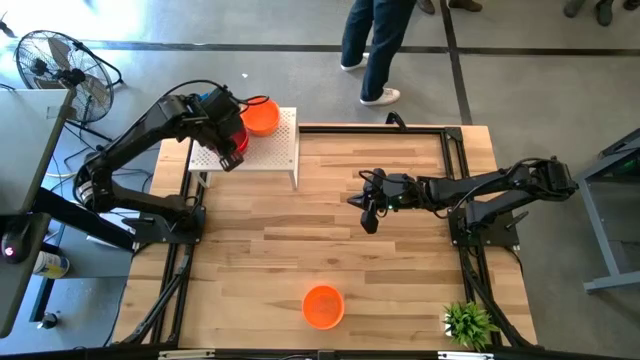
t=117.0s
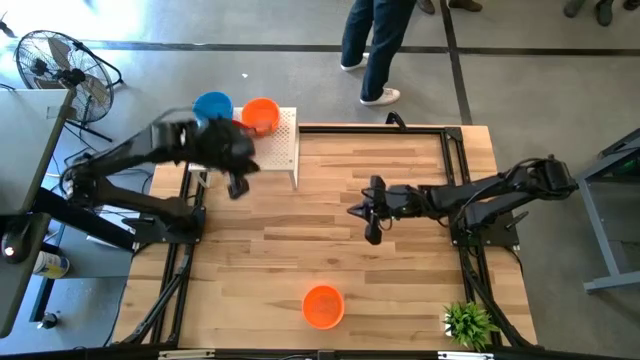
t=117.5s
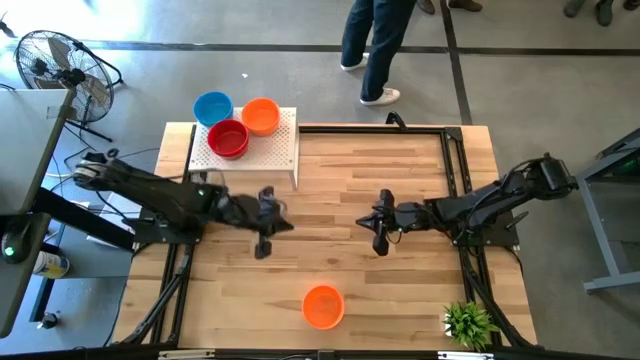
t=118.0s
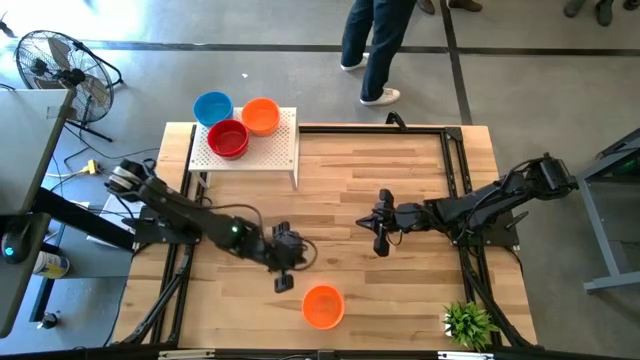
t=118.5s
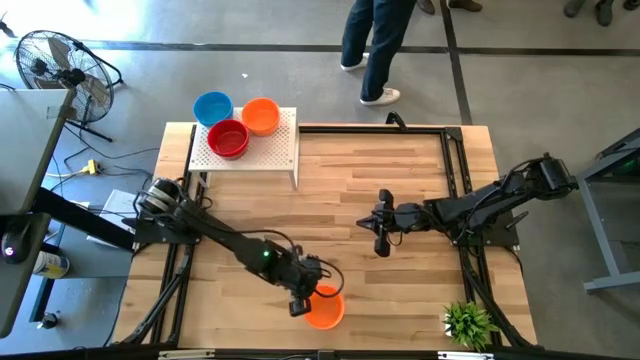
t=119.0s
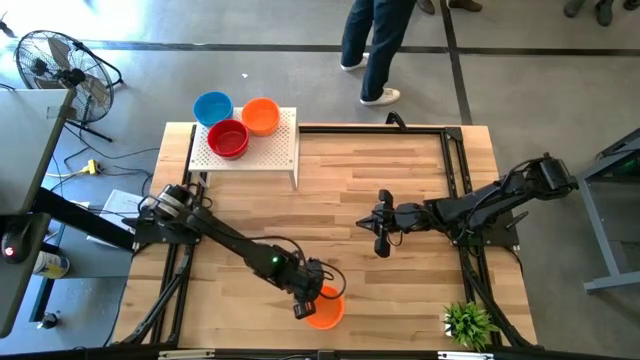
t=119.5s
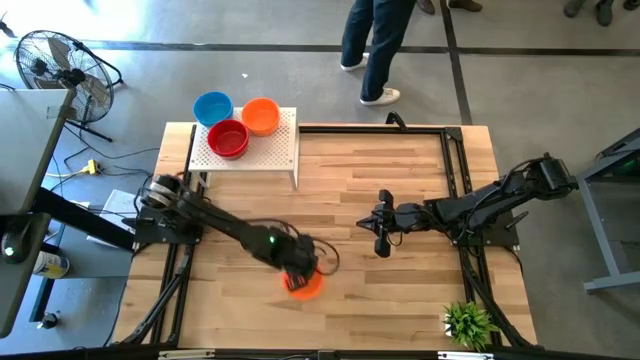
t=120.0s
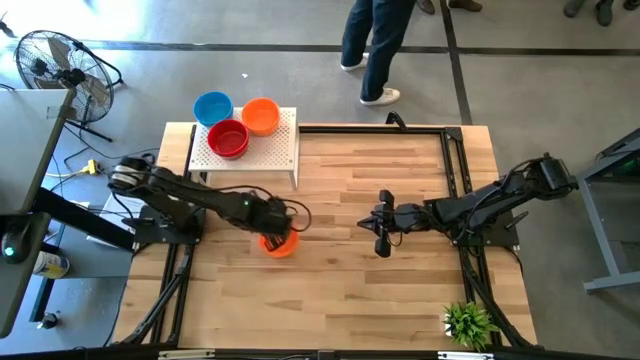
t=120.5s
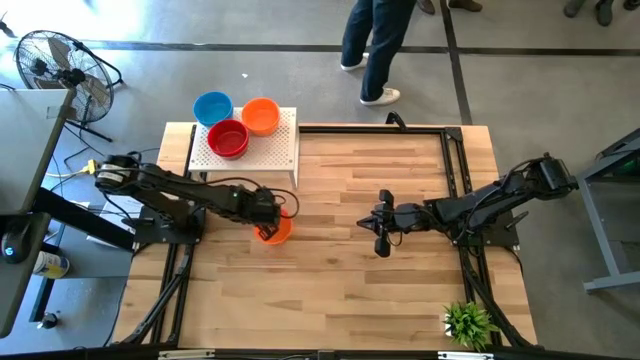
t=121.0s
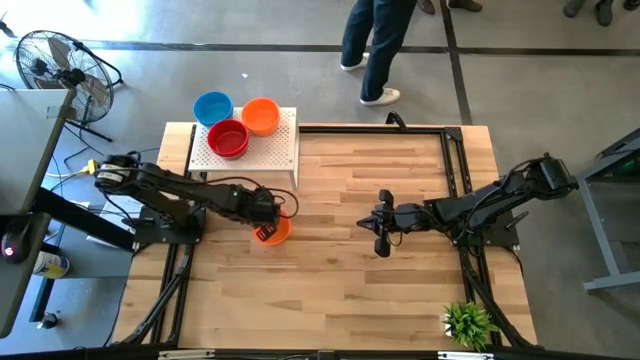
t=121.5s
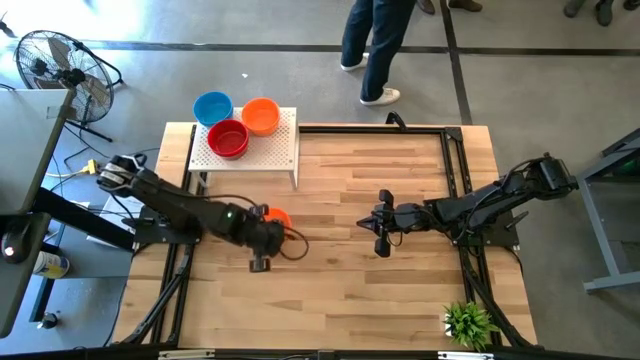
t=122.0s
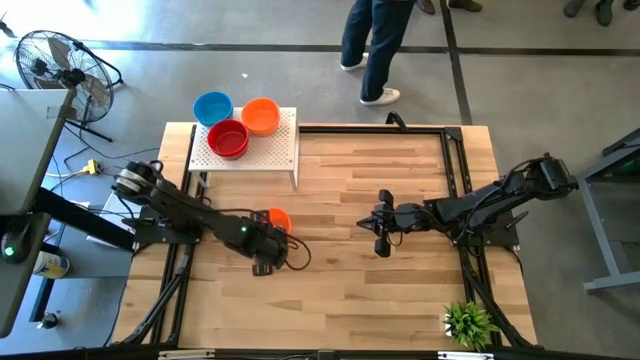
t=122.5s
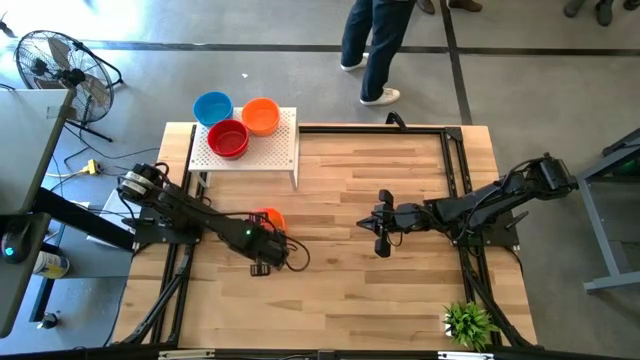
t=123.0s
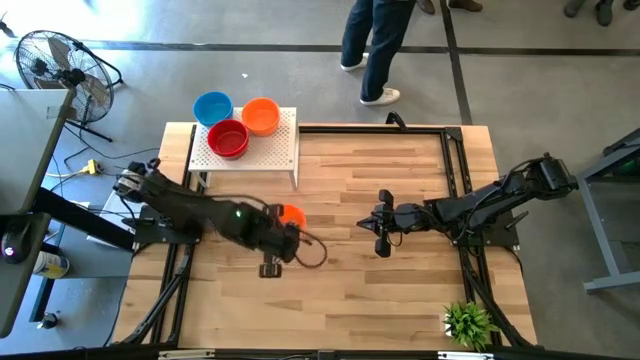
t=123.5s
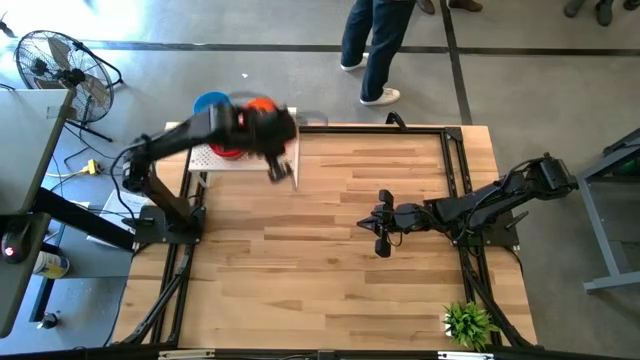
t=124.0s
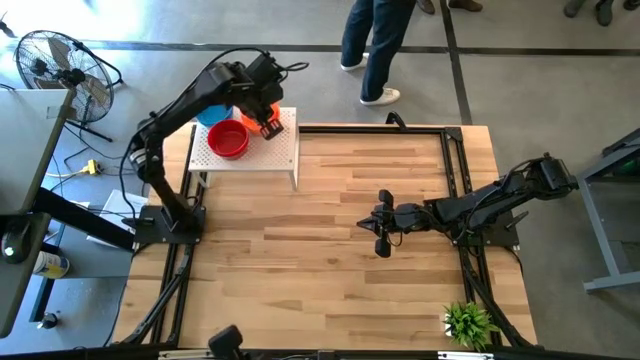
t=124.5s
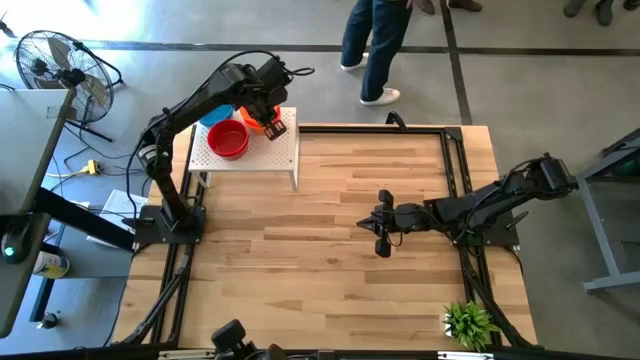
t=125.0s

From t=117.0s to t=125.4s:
Task: Pick & Place Mini bowls
Stack the orange bowl on top of the orange bowl on the shelf

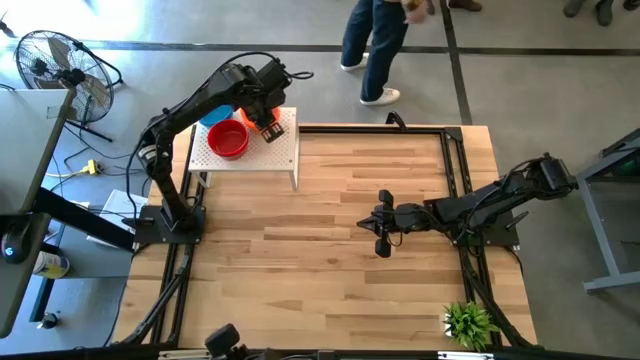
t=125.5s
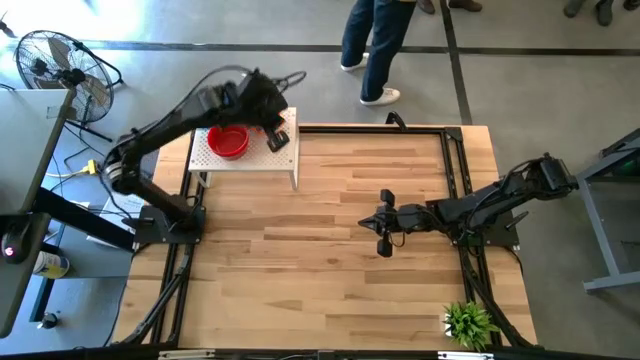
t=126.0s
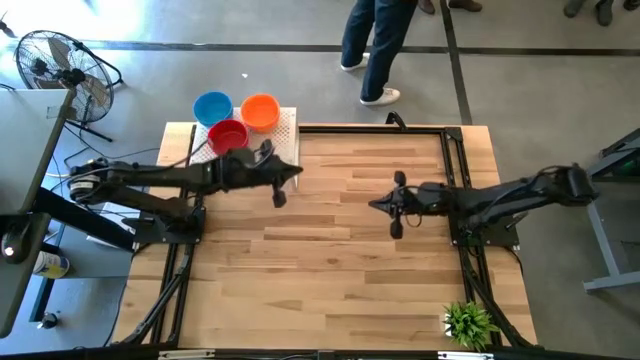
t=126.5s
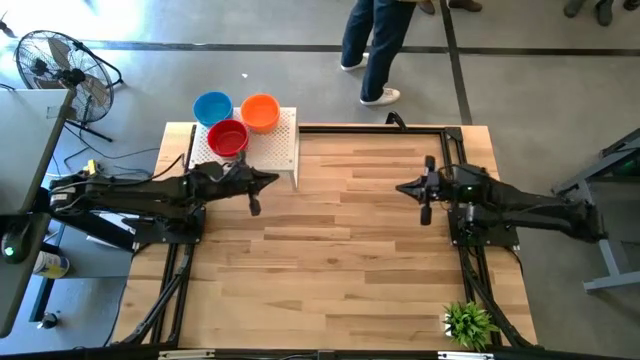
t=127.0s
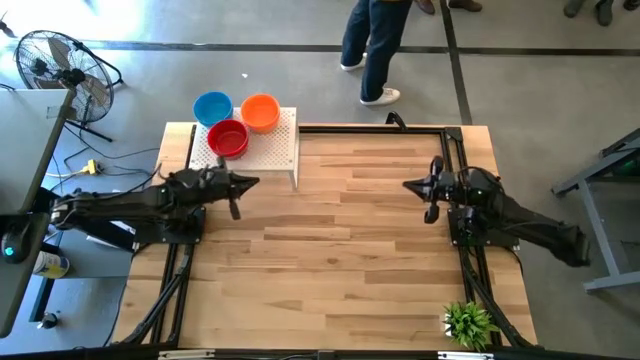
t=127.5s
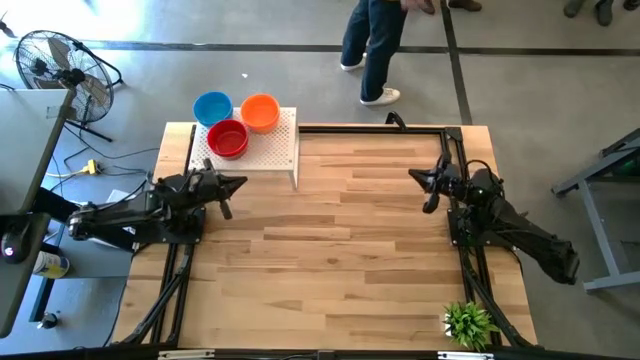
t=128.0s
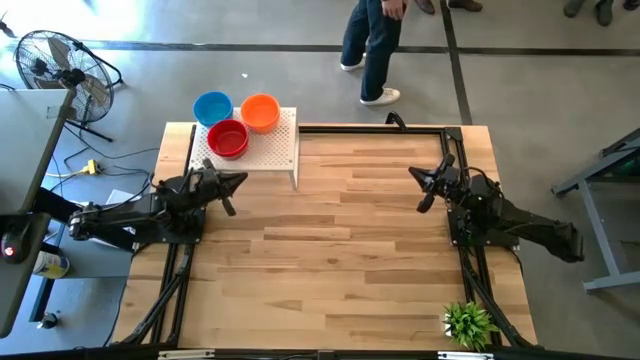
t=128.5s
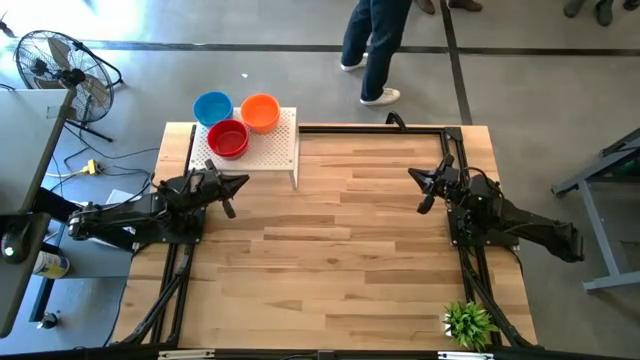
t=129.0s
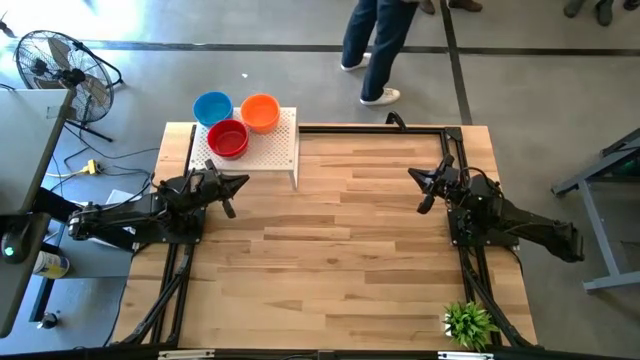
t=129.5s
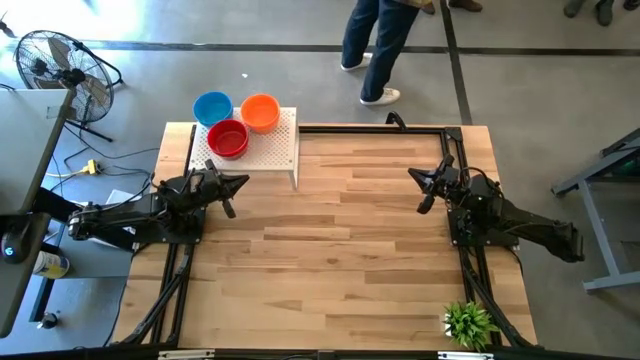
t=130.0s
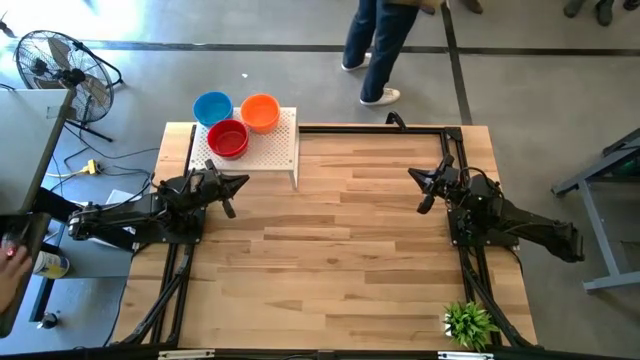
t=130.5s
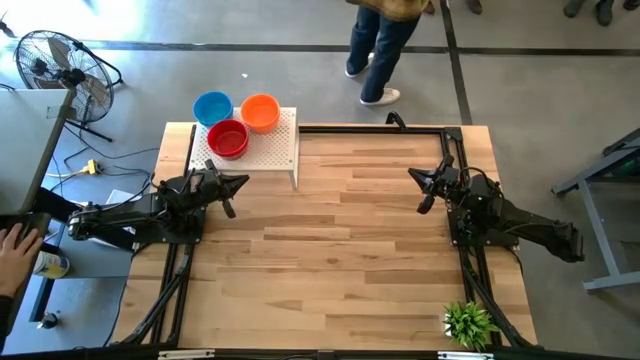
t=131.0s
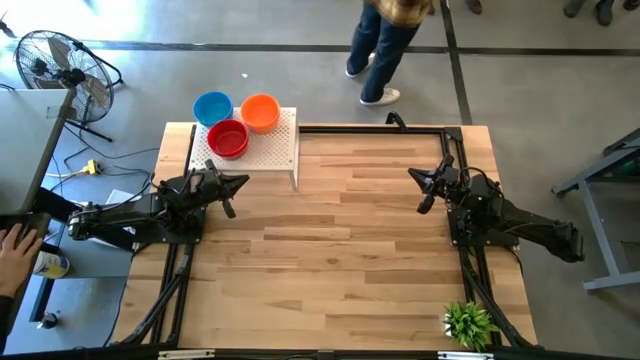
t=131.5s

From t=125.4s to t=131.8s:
Return to Home Position

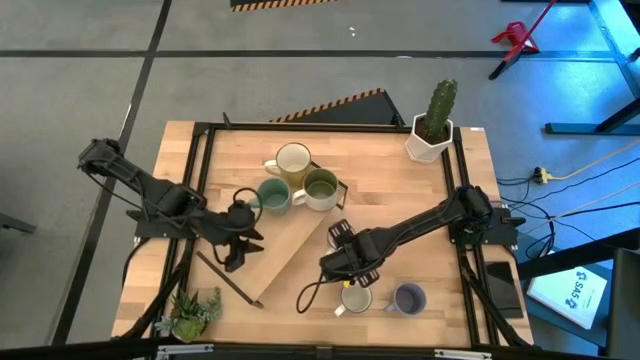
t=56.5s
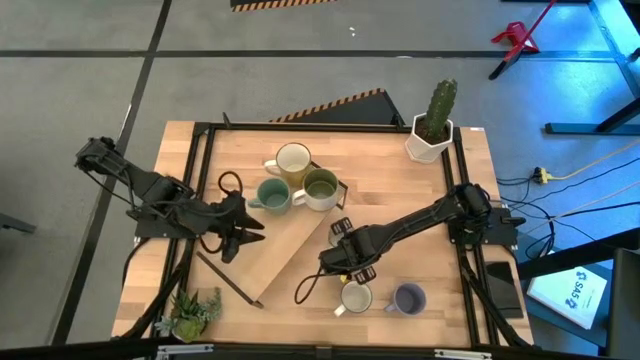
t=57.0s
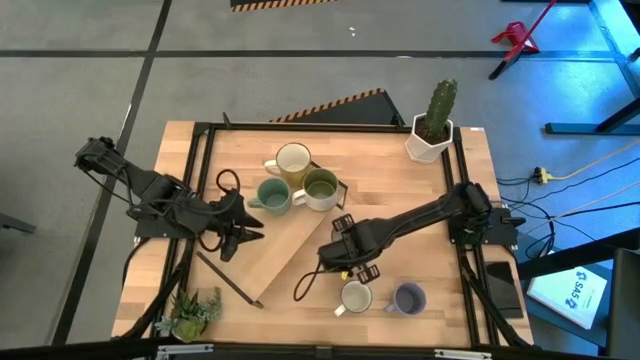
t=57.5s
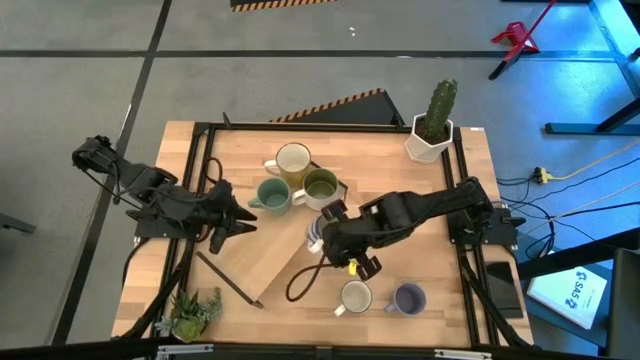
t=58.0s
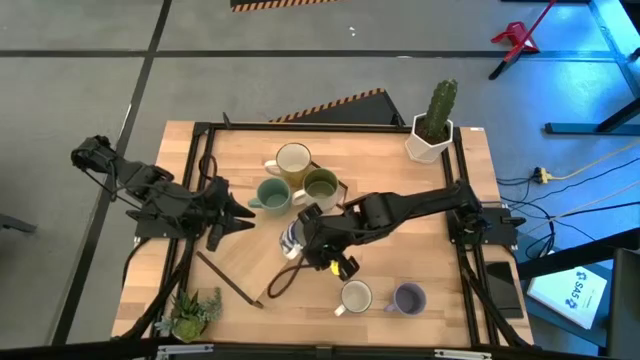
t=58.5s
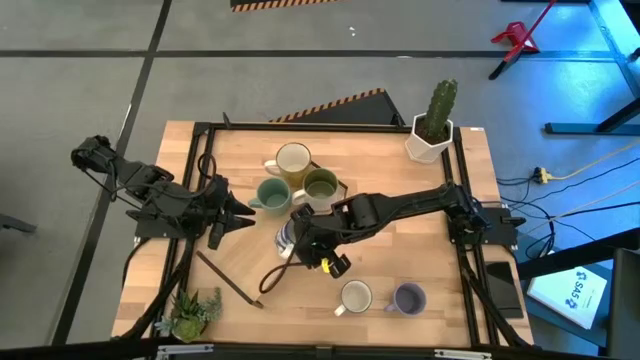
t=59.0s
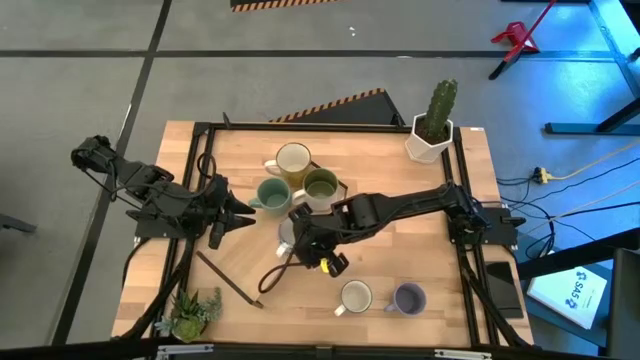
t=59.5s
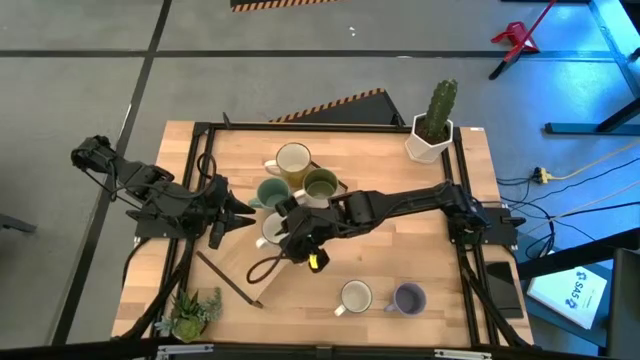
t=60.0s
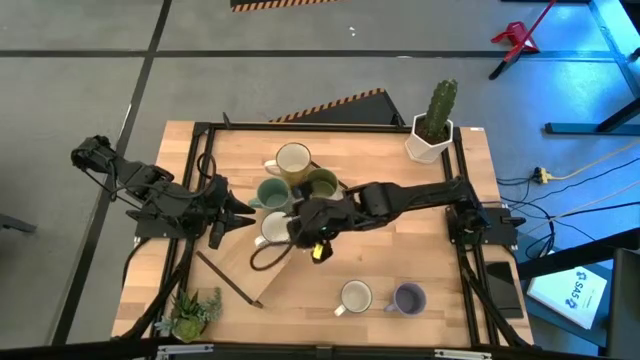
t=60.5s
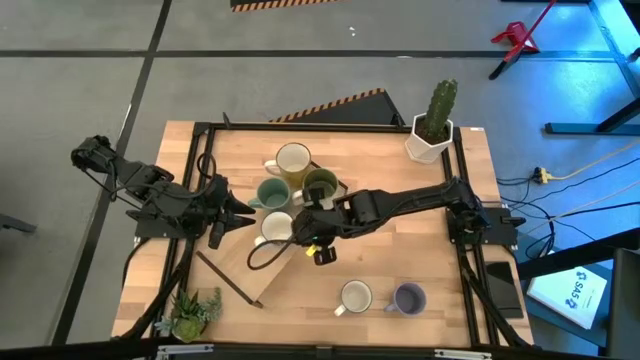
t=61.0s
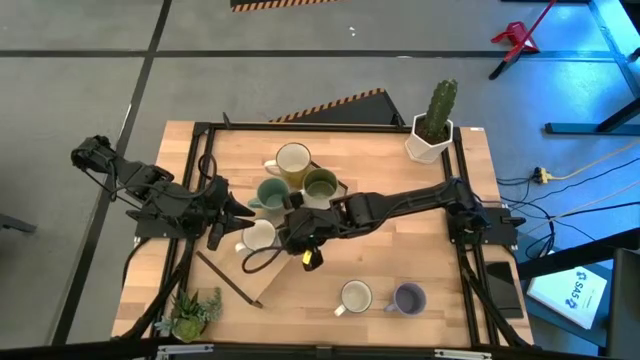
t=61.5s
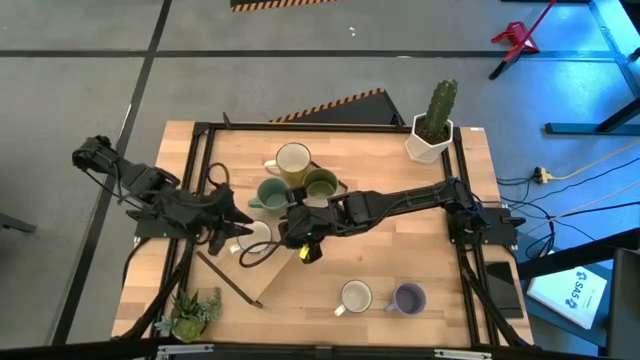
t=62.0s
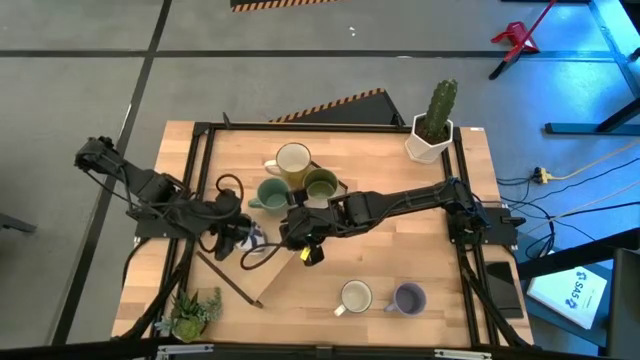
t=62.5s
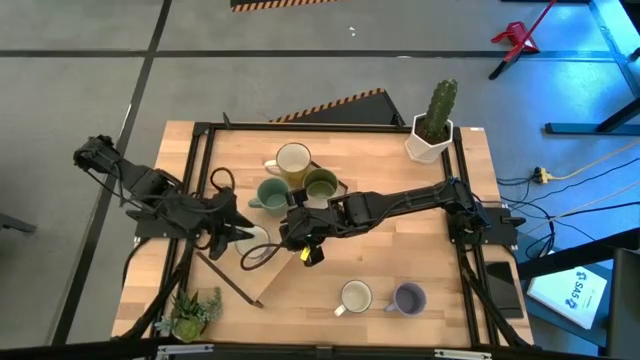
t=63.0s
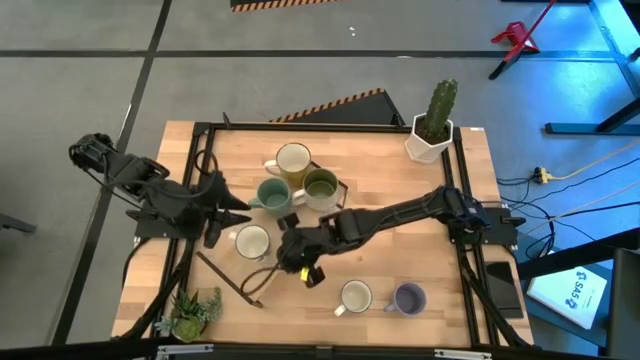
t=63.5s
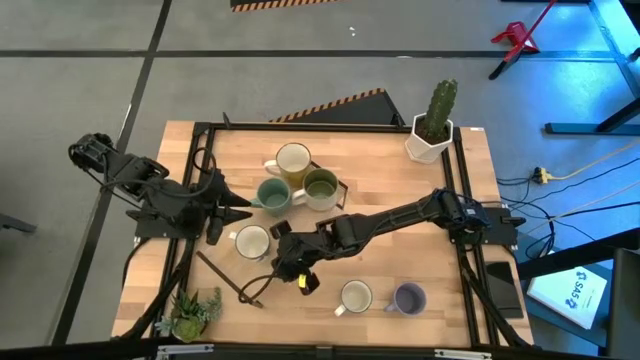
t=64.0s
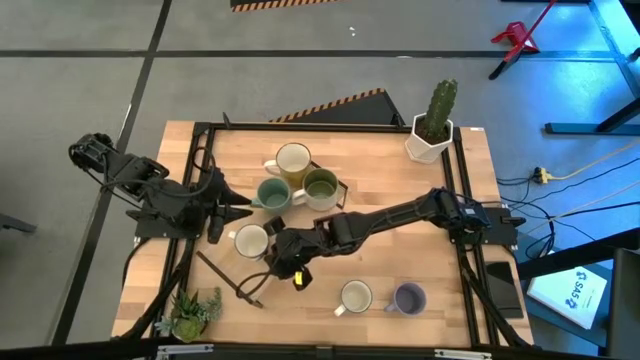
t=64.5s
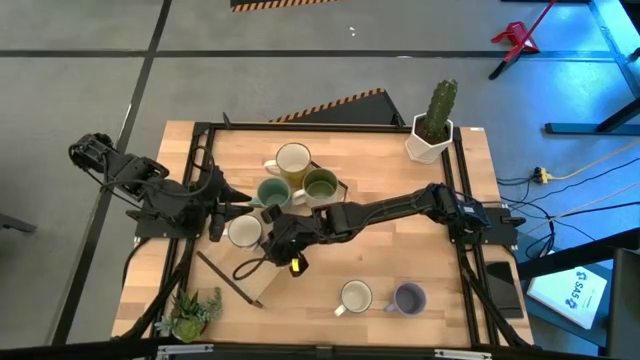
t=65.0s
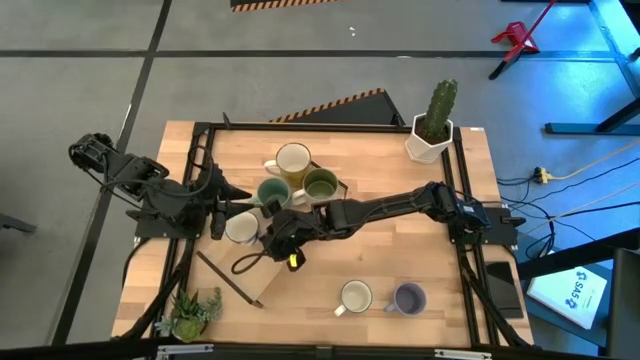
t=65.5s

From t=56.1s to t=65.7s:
Task: Place coffee mugs
Put the flowered mug on the shelf
